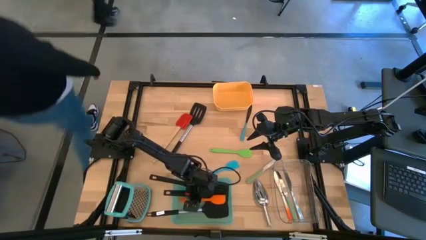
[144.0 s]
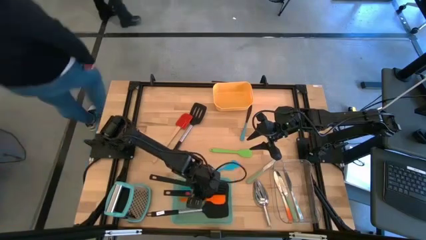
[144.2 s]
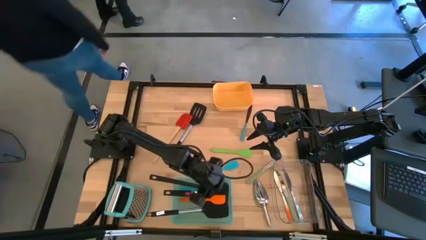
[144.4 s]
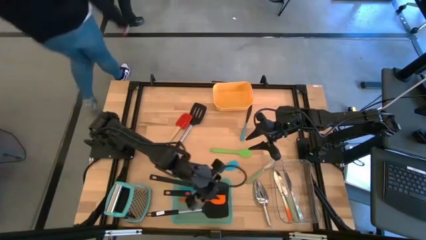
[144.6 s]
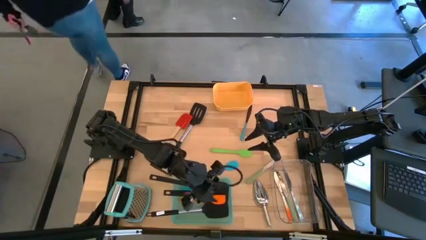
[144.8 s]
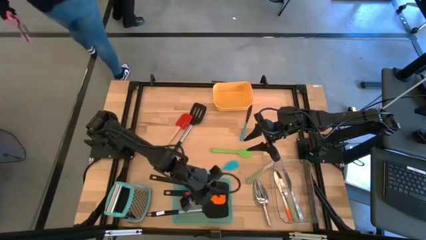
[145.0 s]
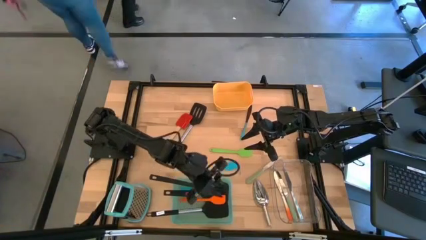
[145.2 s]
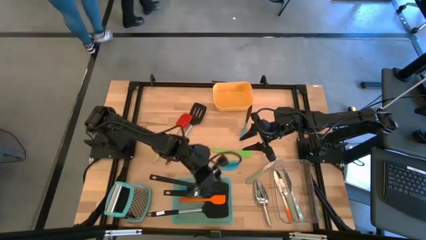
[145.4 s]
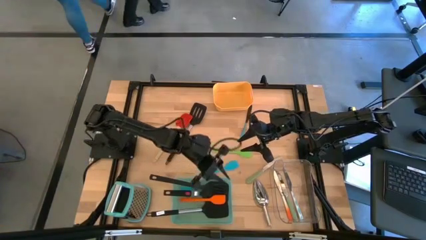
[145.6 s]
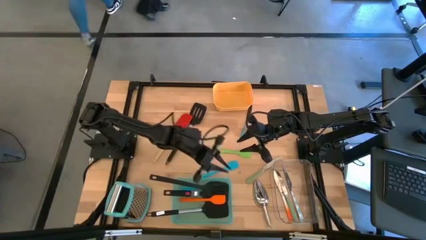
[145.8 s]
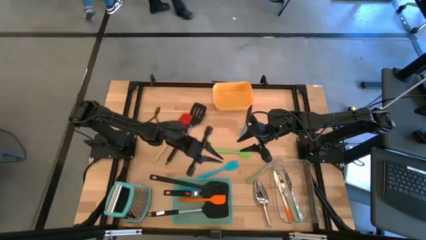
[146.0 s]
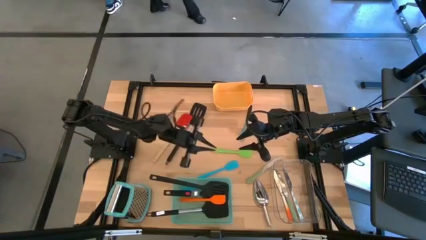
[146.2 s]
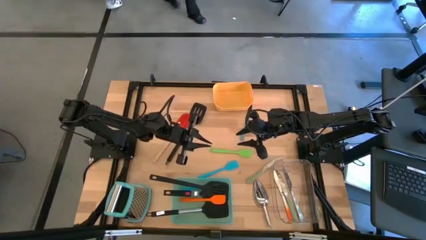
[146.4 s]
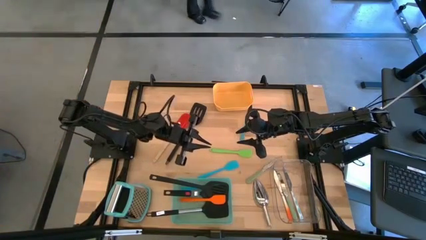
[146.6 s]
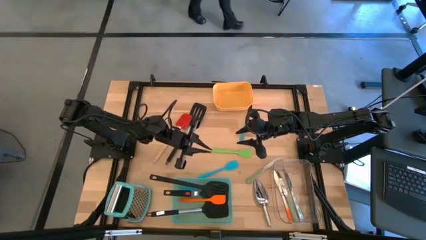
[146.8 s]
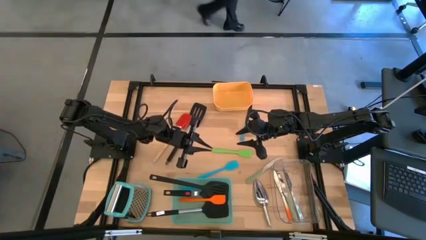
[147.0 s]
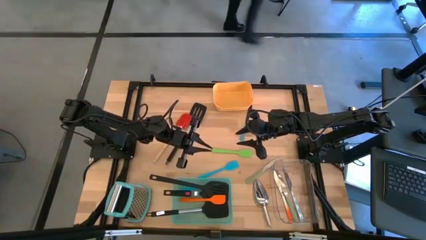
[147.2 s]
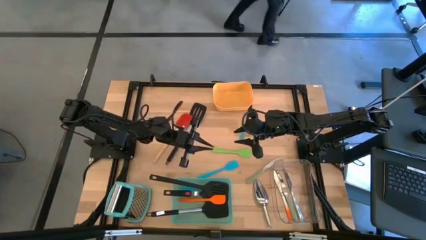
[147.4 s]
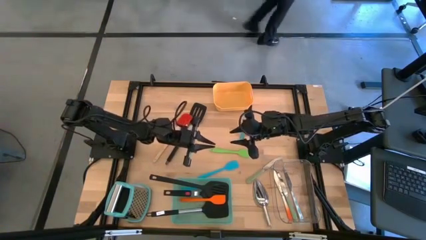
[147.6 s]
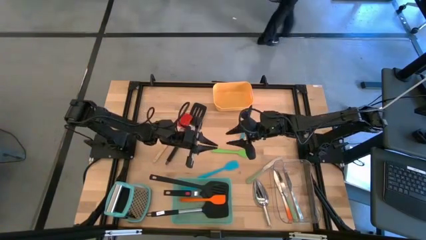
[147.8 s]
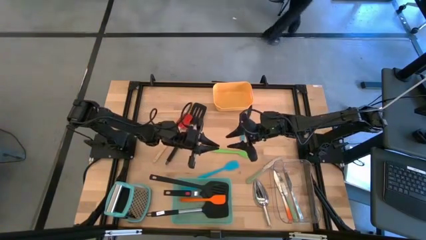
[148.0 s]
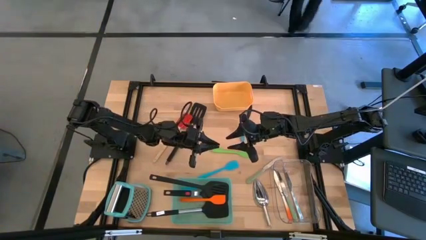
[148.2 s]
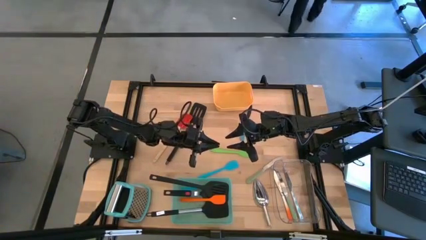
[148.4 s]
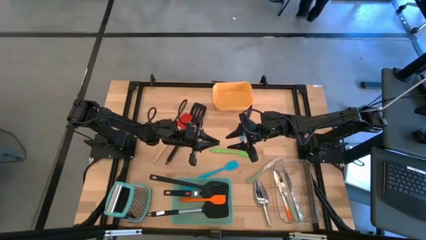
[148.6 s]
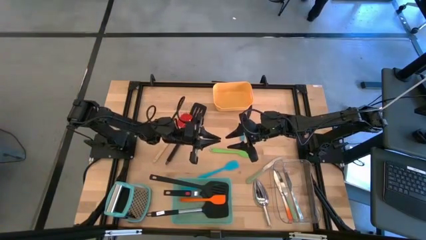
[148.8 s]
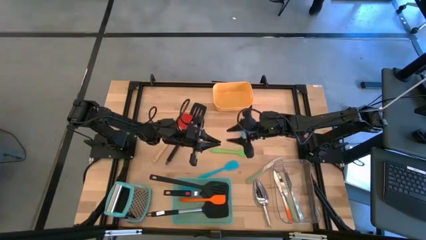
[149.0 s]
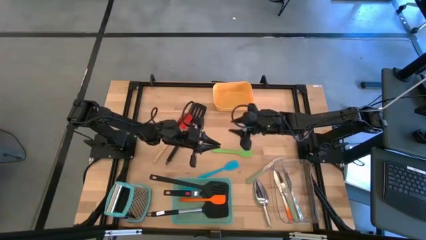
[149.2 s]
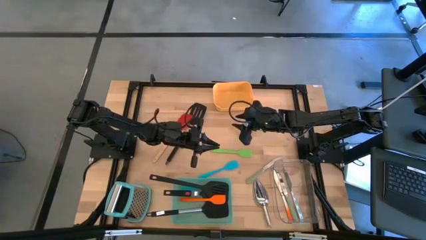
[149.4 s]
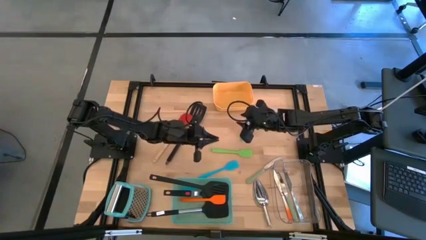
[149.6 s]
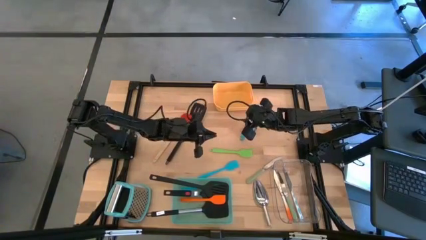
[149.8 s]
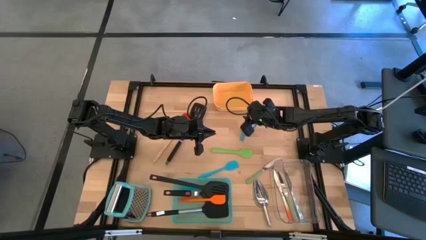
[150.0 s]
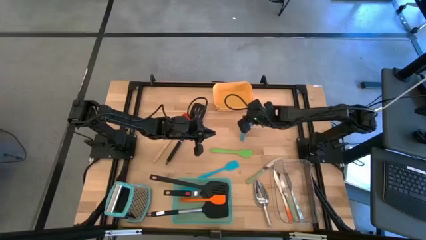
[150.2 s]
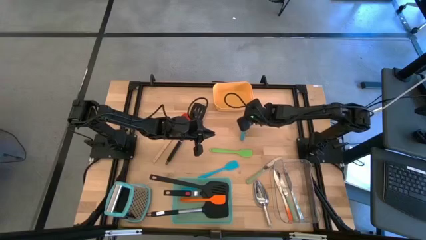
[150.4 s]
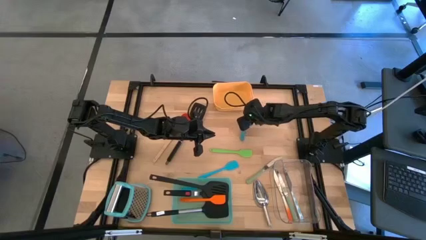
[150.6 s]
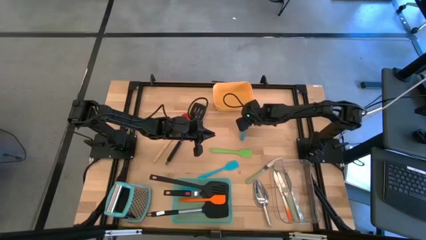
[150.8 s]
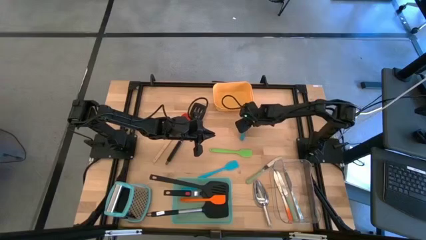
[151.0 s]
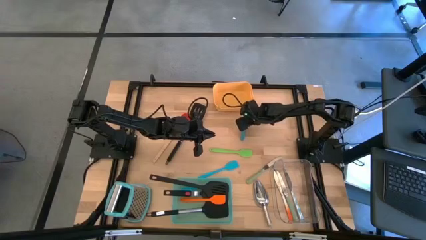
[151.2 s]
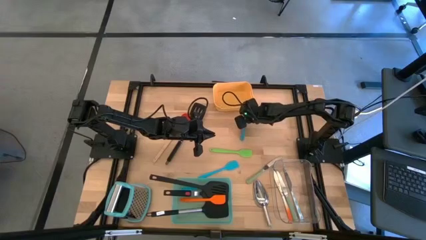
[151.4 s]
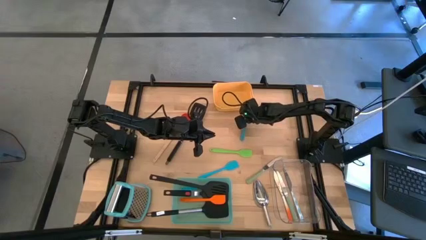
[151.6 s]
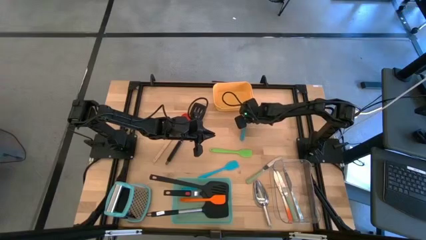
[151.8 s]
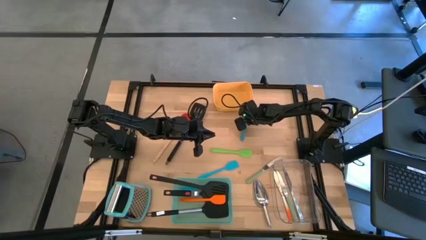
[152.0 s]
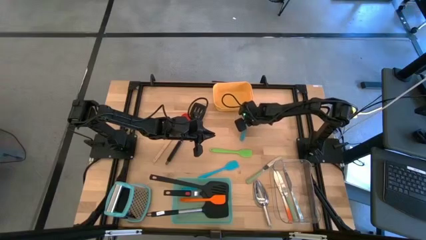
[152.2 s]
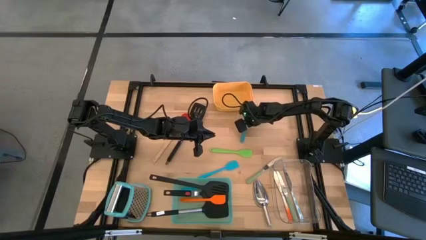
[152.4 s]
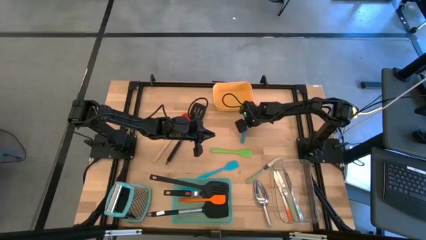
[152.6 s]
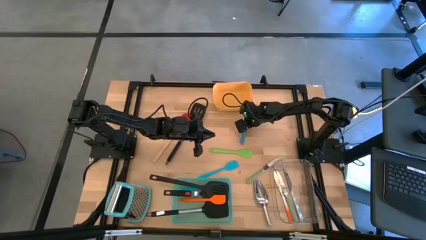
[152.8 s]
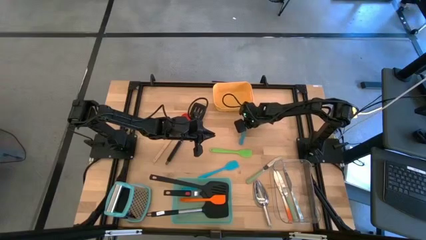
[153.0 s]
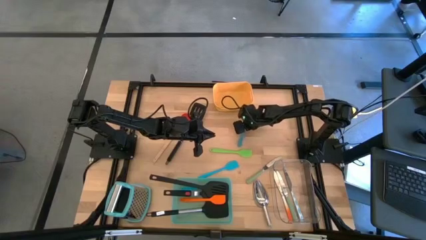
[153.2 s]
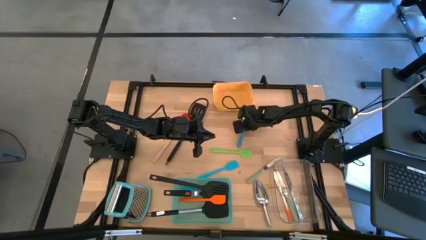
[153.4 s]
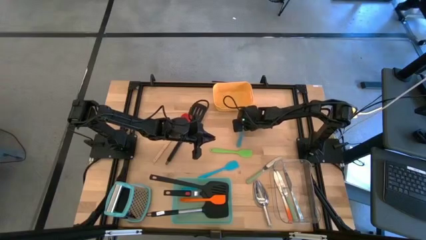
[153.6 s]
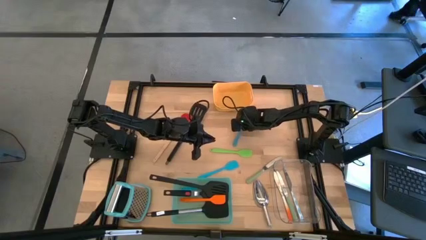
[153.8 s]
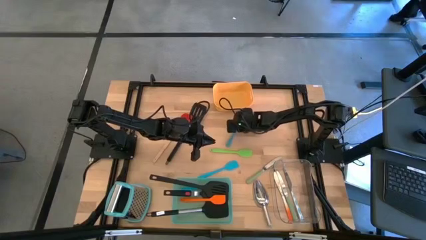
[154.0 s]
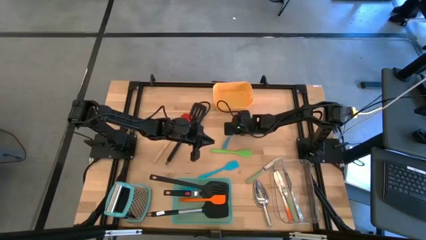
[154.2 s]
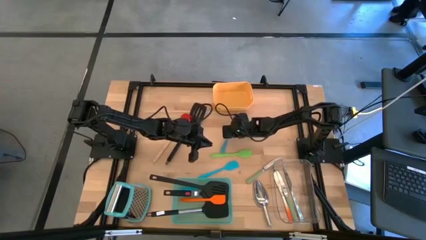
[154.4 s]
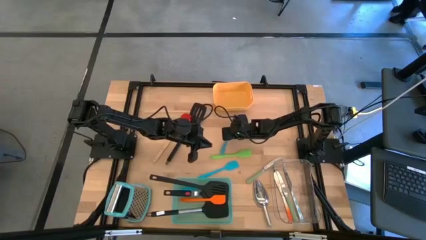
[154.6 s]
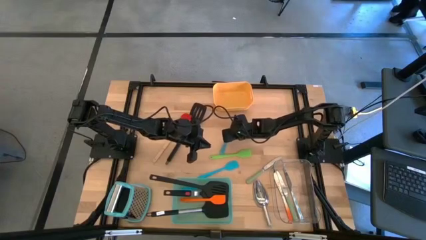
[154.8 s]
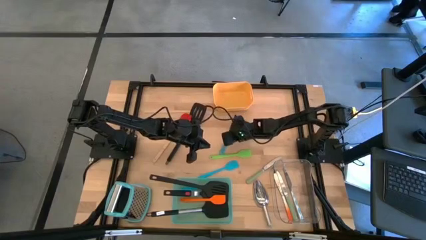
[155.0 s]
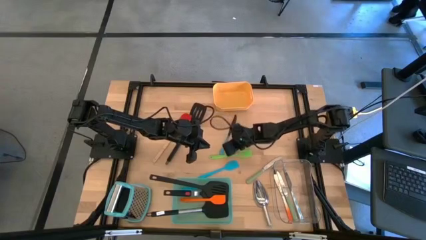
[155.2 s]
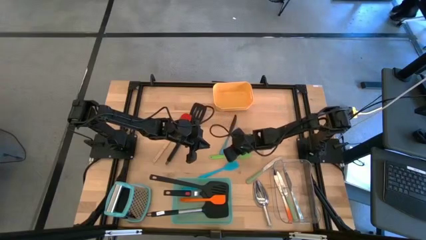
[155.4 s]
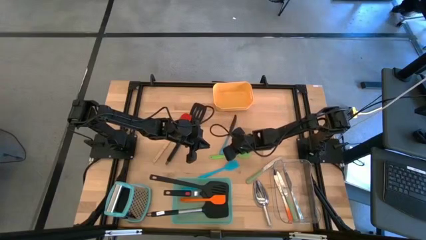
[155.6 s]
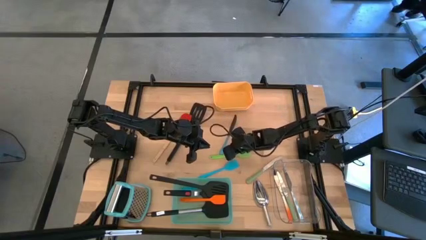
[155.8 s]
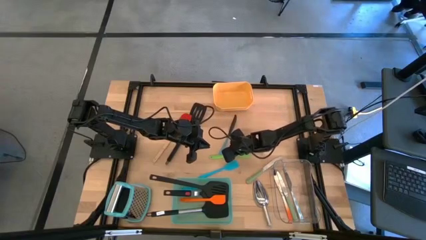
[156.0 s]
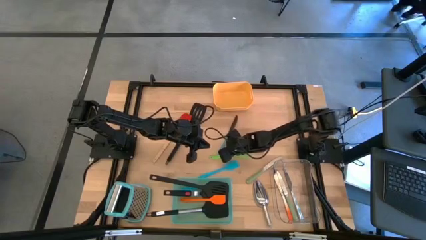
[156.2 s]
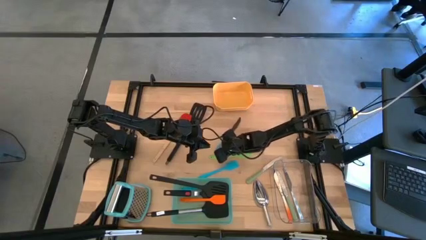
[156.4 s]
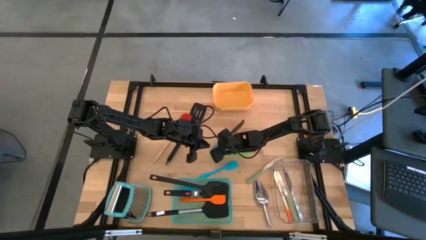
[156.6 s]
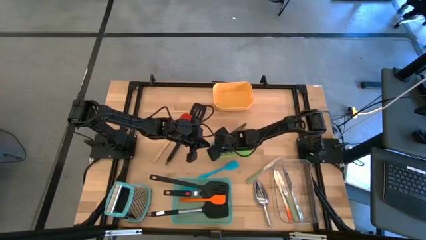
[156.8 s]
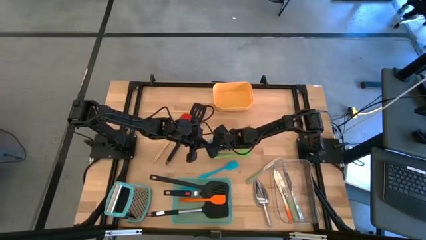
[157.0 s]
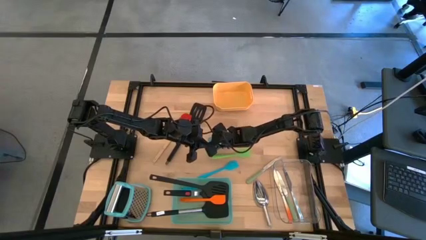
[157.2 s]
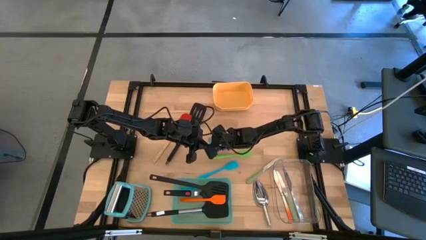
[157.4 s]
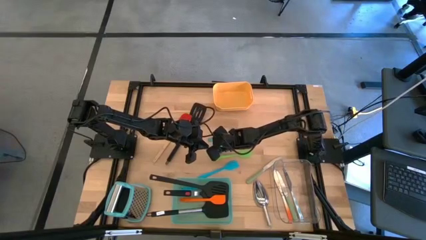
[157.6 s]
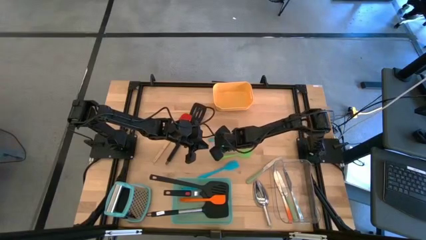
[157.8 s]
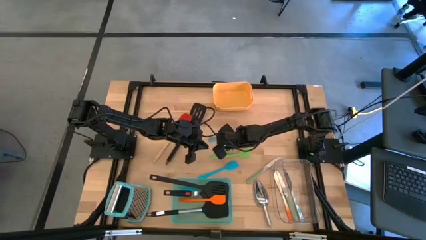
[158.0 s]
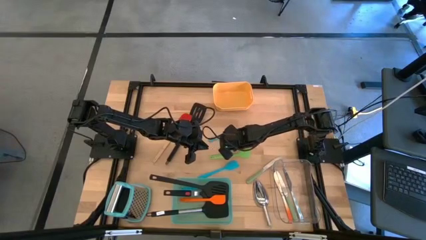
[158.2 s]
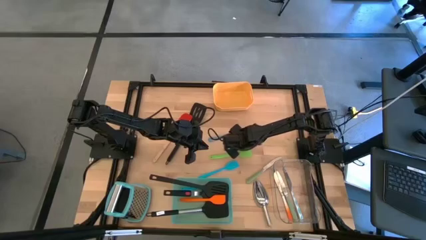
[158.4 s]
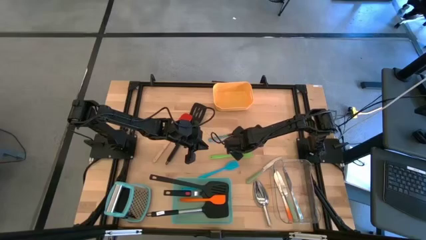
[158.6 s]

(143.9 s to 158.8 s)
Task: Pick & Place Kitchen Items
Put the black spatula into the blue bin
